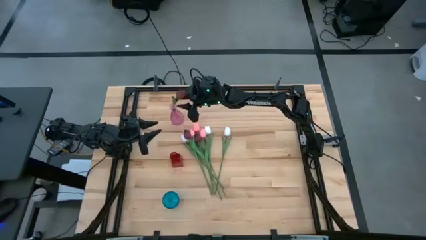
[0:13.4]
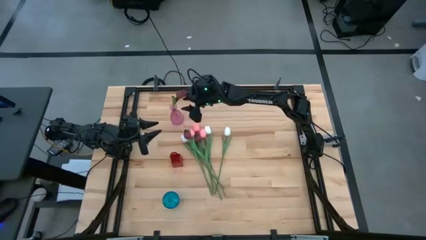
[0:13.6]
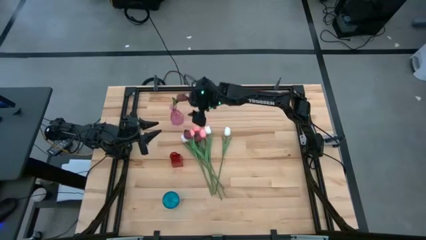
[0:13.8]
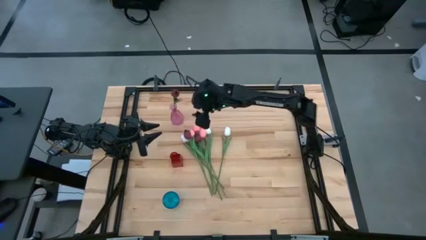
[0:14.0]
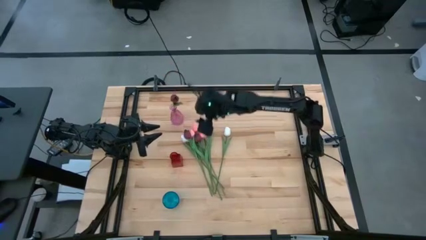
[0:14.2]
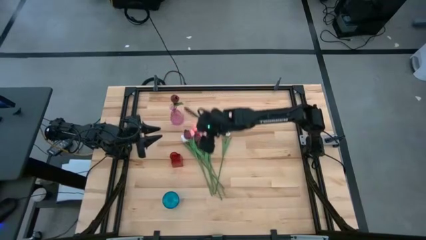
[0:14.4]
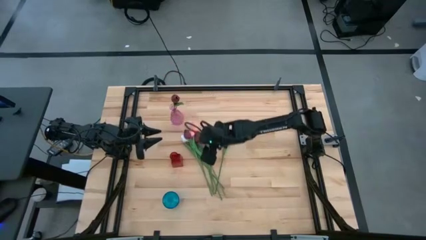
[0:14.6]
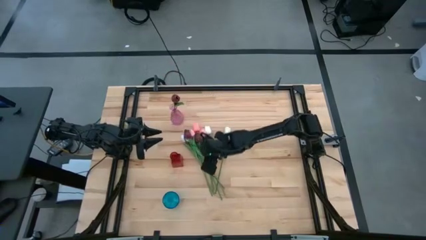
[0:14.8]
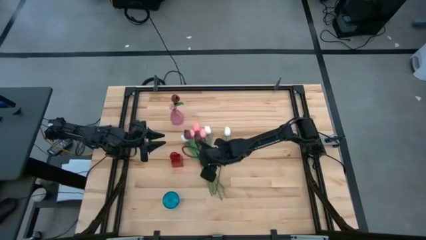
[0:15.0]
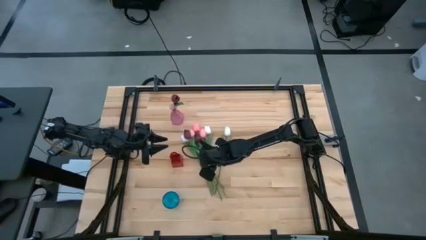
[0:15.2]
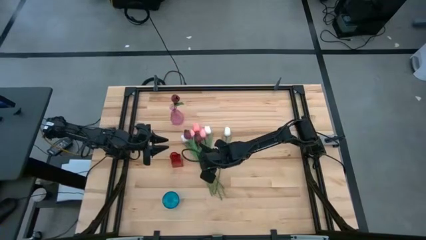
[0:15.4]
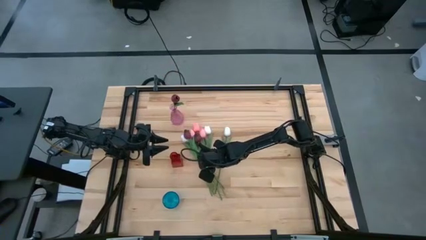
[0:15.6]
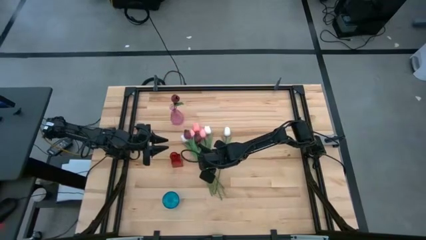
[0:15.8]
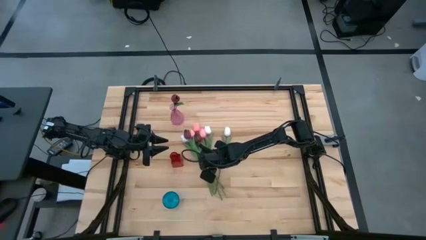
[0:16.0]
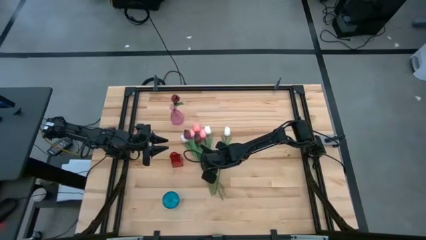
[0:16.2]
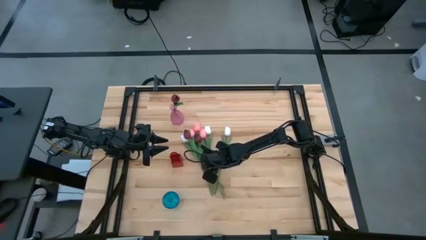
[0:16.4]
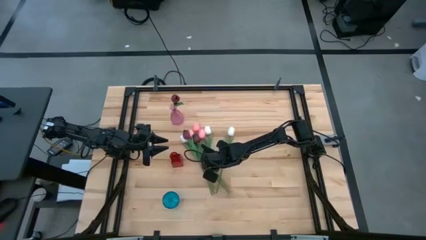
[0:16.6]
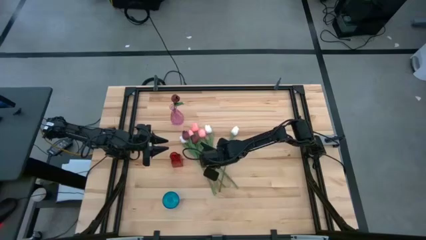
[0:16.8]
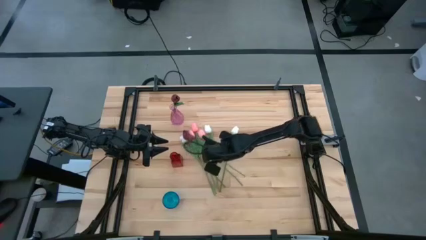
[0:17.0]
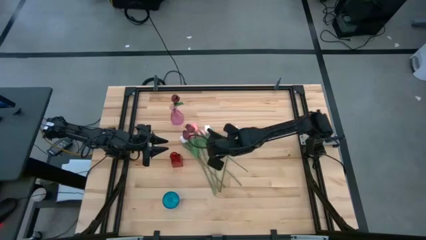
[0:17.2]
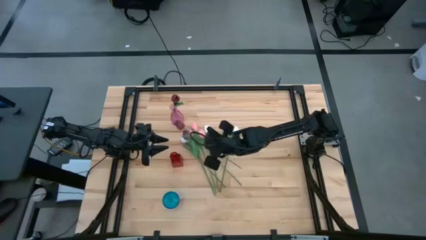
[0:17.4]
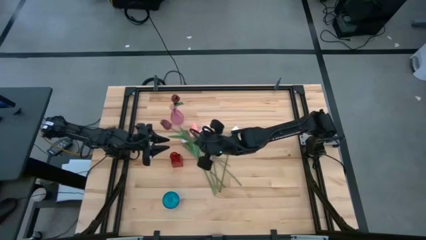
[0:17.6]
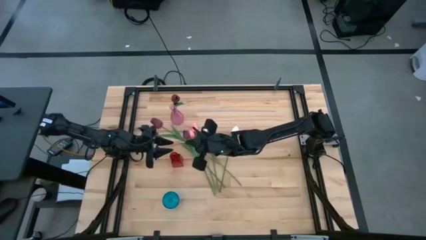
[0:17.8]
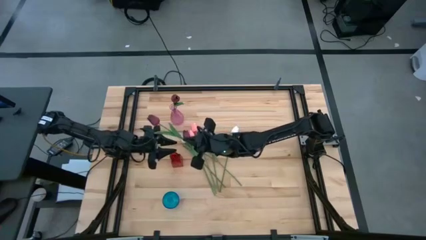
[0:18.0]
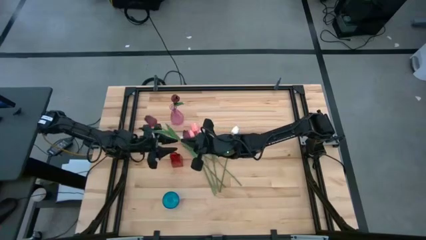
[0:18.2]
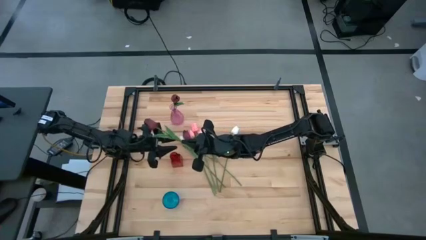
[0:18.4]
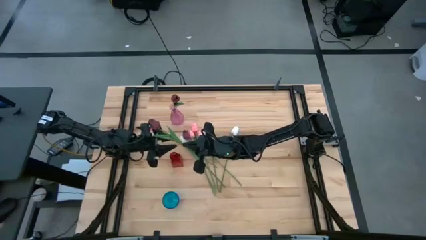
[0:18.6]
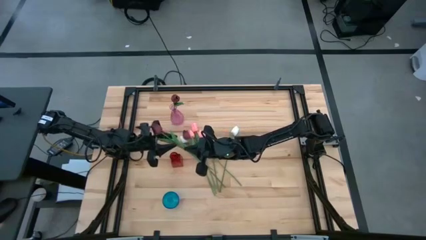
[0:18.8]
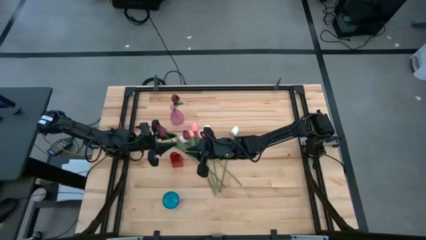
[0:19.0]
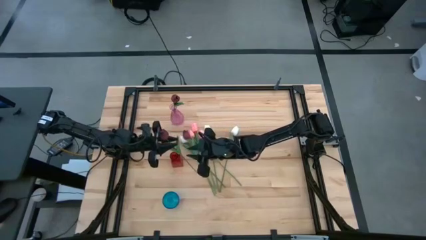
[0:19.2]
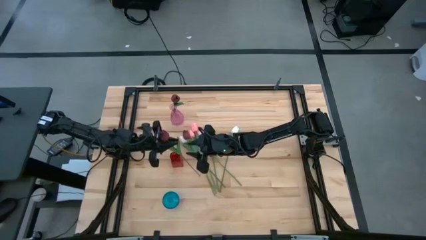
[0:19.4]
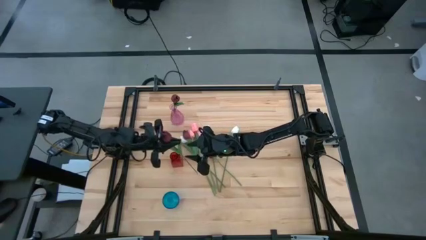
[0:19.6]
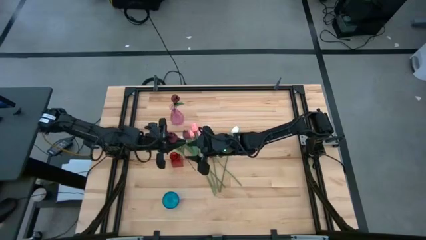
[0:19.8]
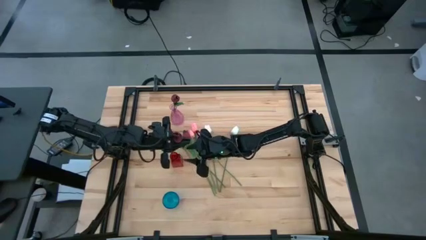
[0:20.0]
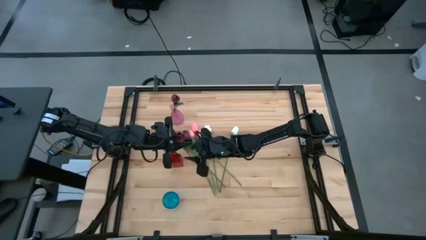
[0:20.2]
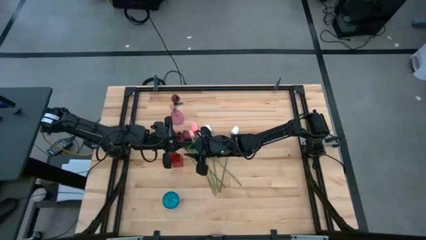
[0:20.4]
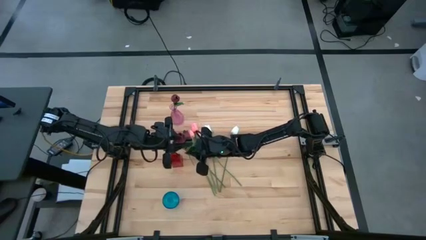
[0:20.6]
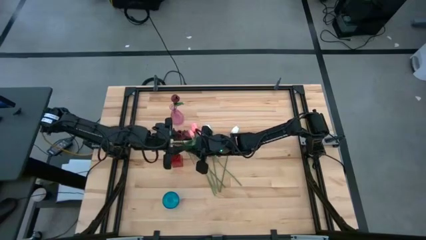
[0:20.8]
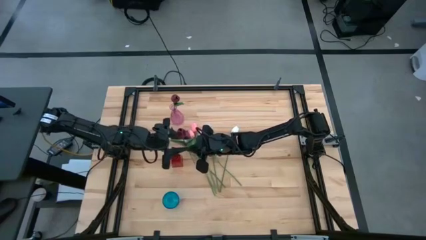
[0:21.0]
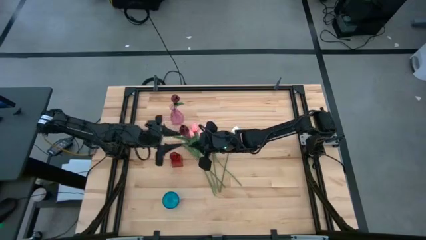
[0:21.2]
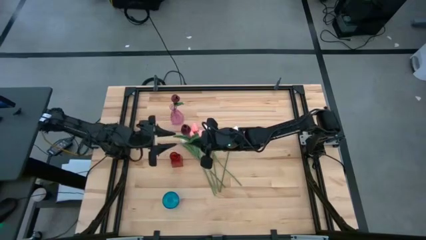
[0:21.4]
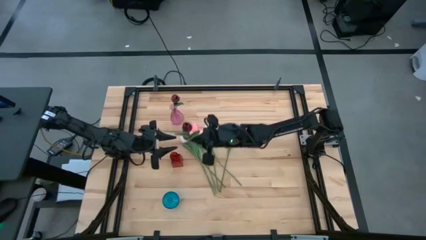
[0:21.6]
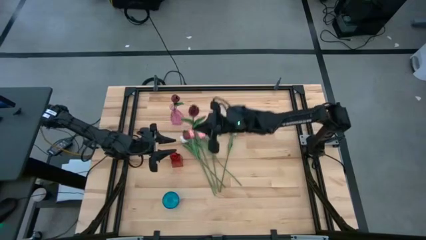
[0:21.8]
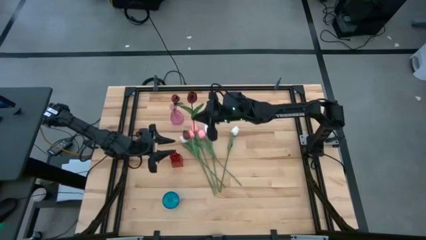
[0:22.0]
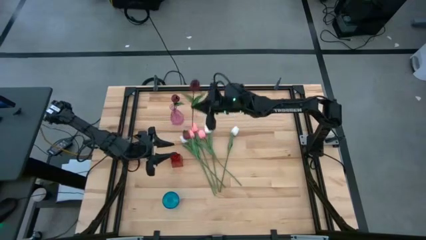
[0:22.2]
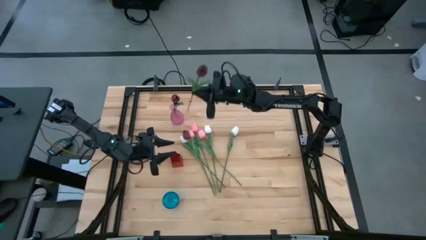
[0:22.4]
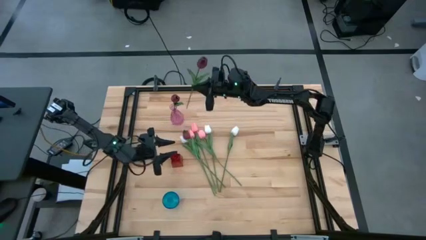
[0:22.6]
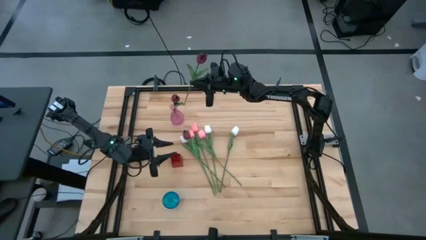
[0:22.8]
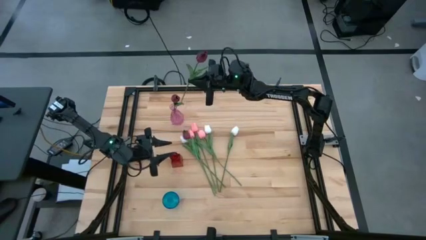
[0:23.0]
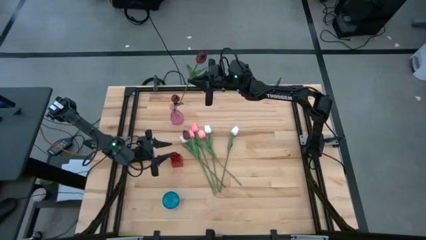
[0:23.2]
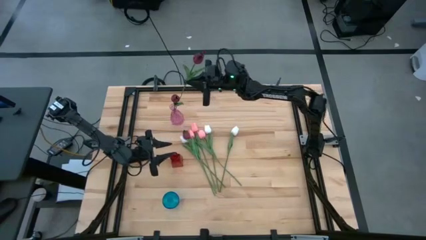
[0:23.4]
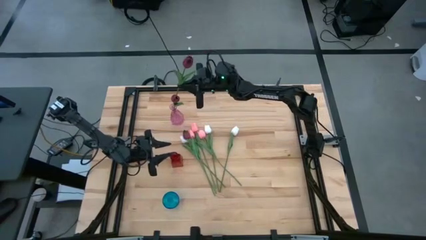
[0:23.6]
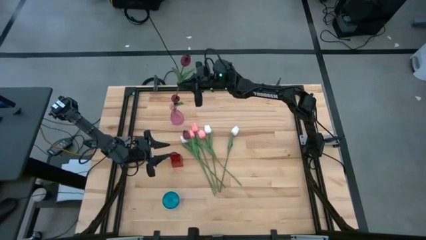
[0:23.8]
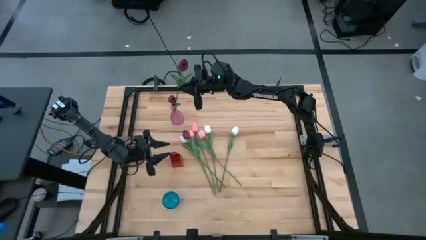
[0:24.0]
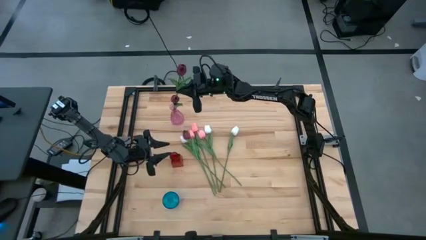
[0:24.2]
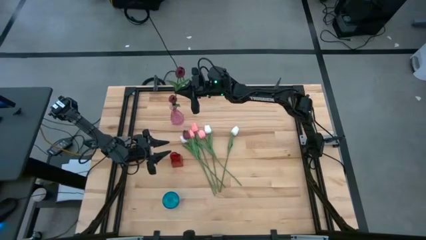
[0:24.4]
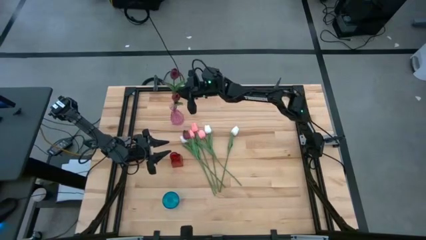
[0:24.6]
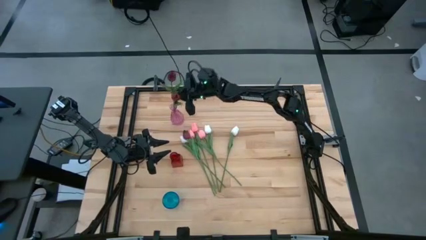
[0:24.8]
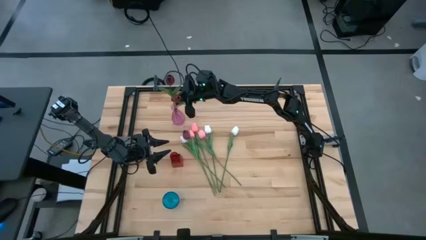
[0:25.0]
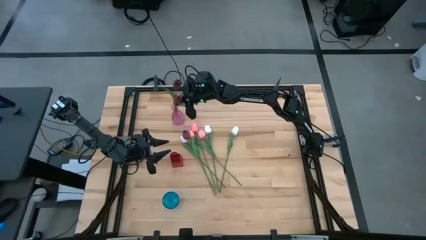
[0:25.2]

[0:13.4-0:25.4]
Task: Sort flowers into vase by color
Put the right red flower into the pink vase

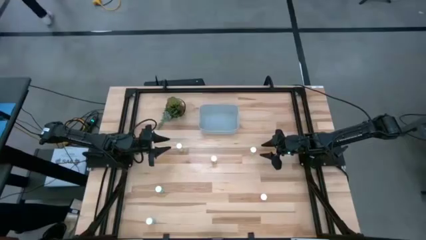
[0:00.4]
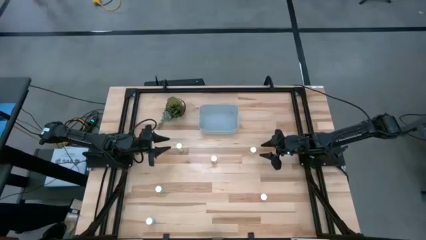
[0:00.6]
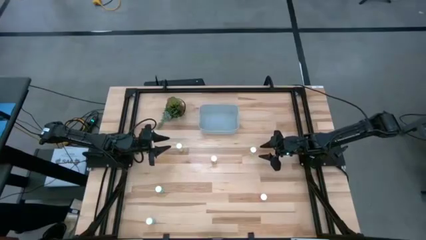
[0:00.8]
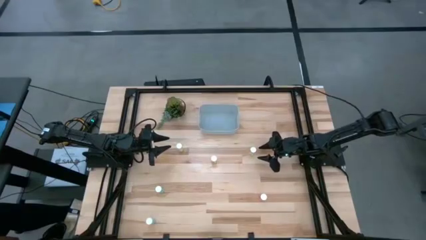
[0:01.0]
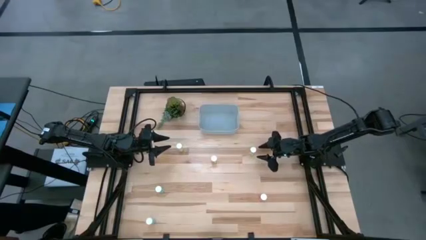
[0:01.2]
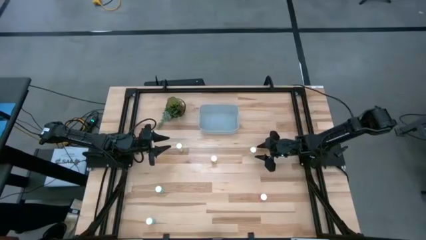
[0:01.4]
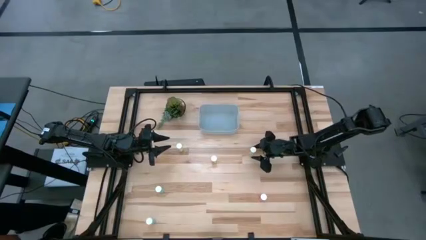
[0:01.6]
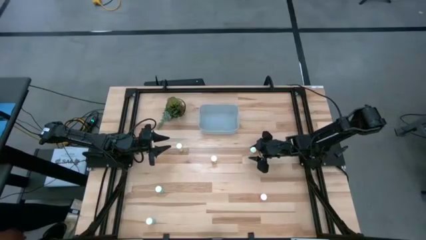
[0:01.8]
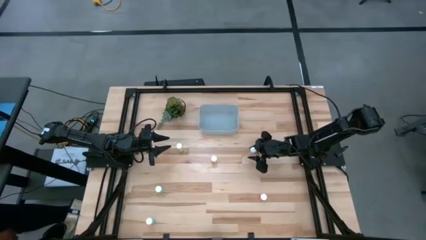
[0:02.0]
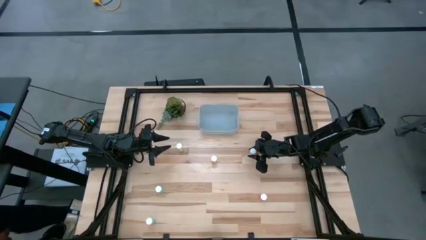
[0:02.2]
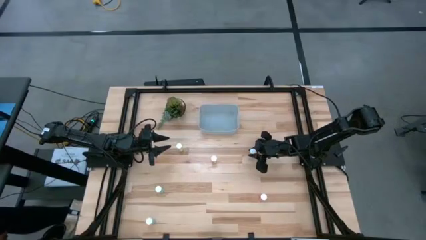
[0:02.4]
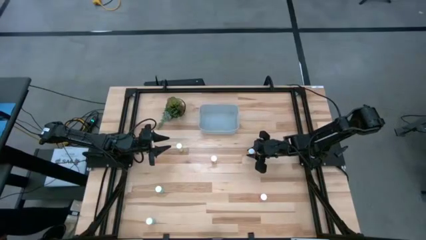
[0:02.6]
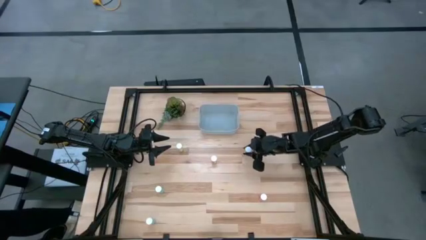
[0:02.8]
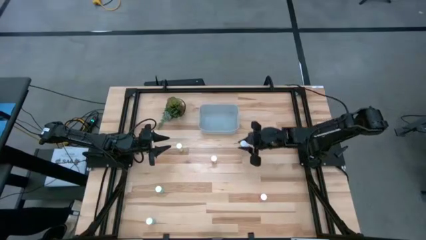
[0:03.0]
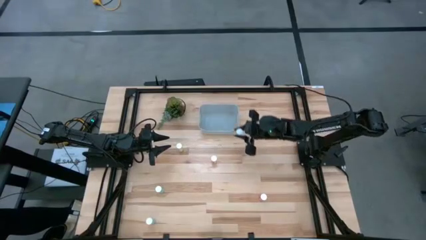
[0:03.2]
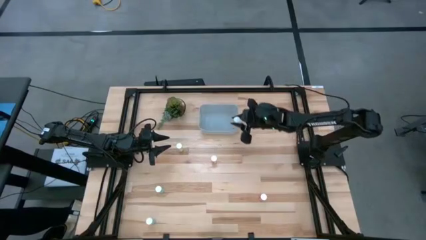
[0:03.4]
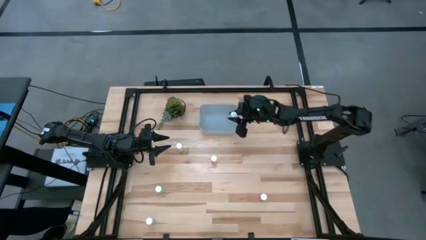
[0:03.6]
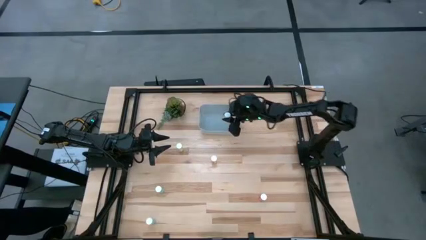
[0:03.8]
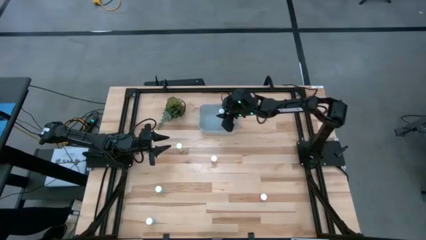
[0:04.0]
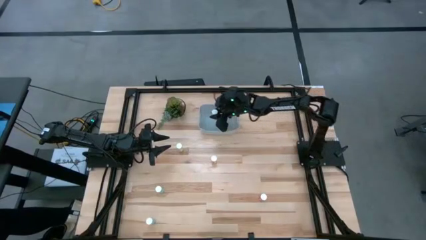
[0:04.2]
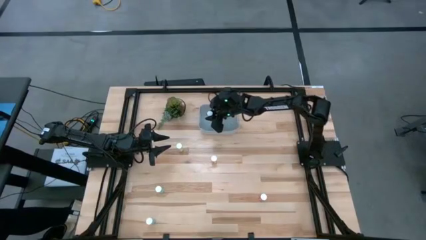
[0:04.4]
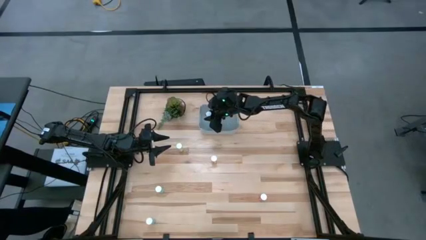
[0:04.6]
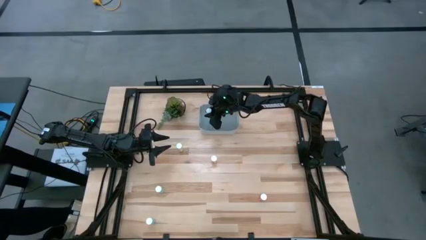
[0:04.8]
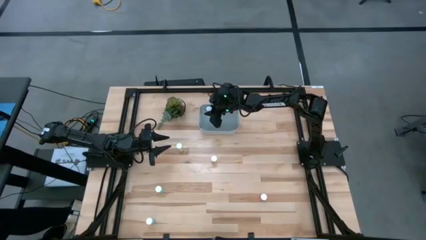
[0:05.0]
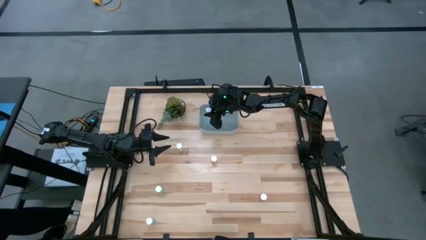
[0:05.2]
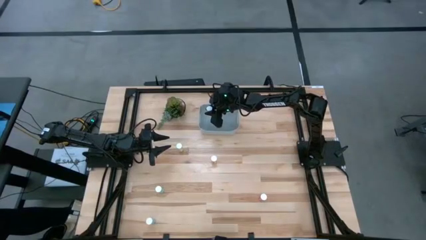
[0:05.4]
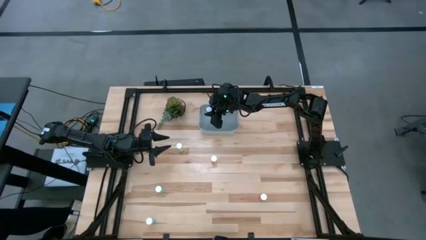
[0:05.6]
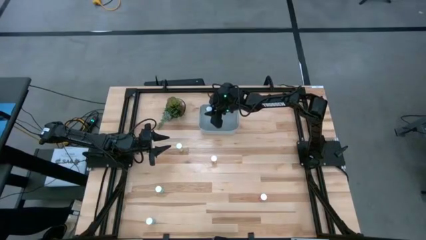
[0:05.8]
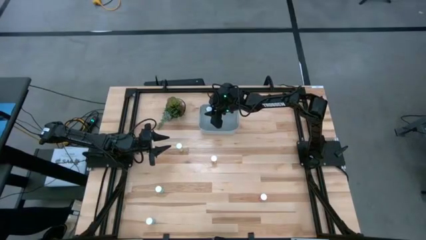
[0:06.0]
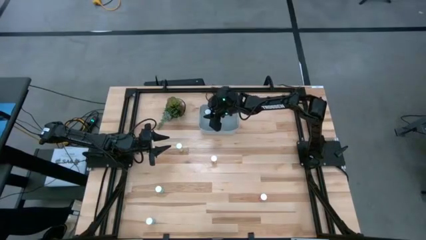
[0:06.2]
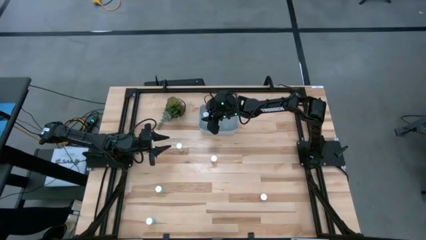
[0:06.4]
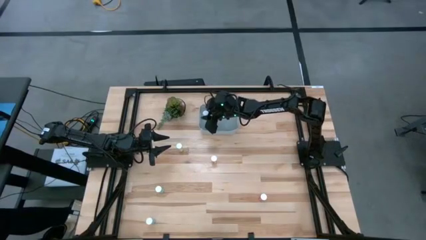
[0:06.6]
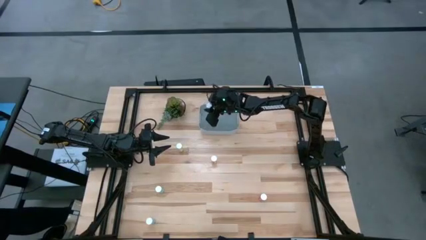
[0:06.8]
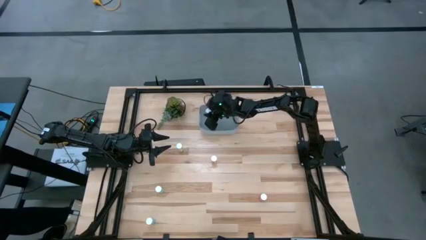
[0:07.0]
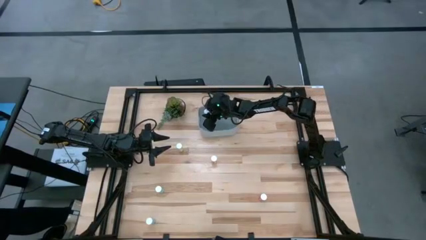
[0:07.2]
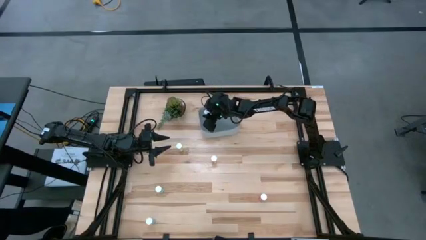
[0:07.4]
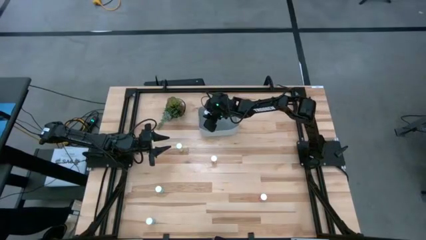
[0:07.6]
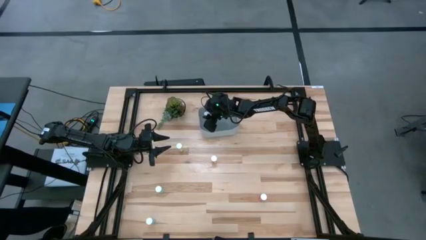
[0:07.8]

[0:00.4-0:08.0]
Task: Pick and place pill bottles into a basket
Put the top right yellow pill bottle into the bin
